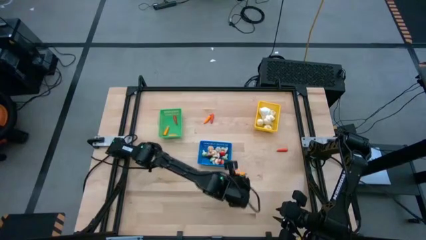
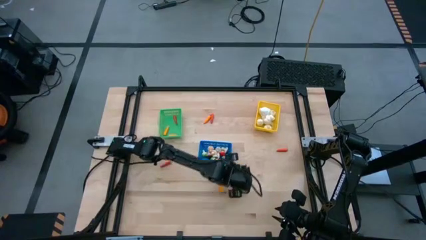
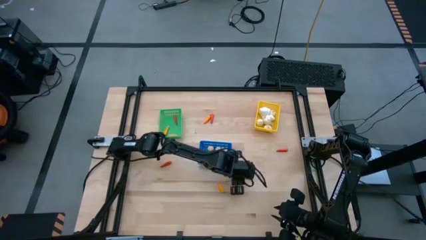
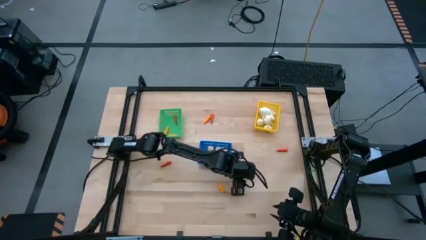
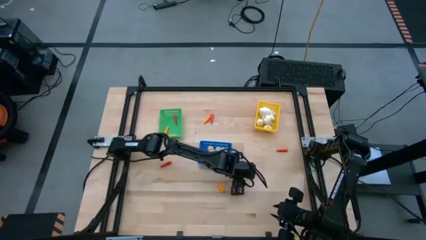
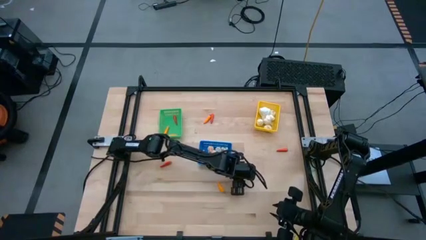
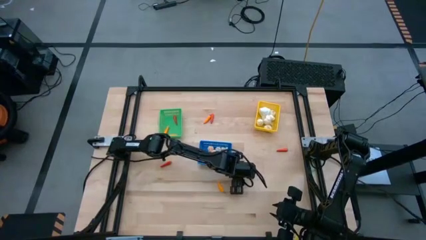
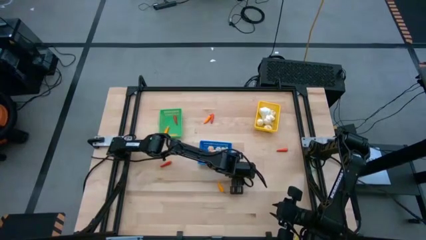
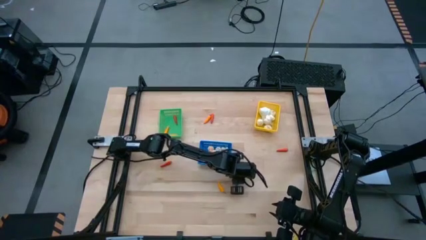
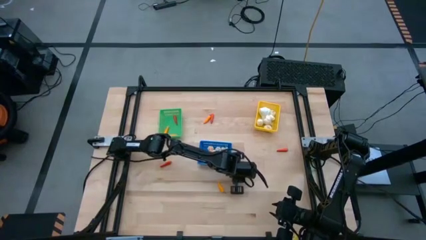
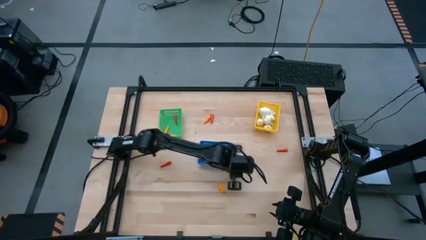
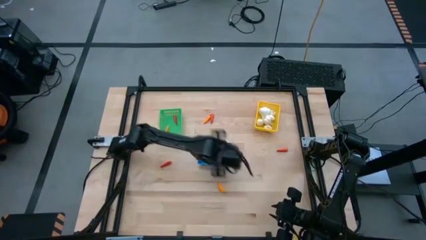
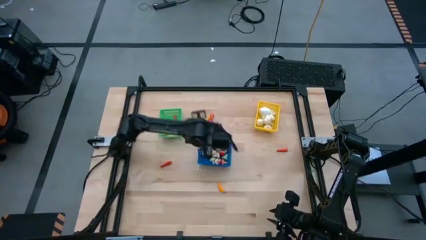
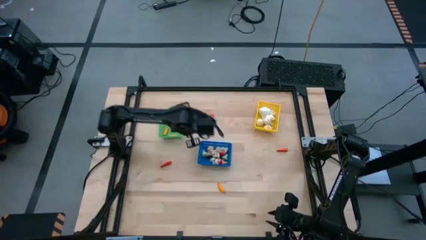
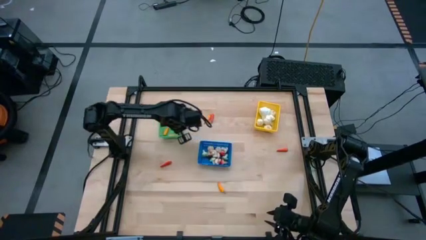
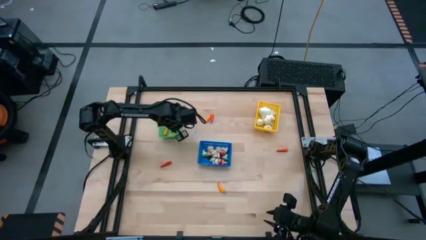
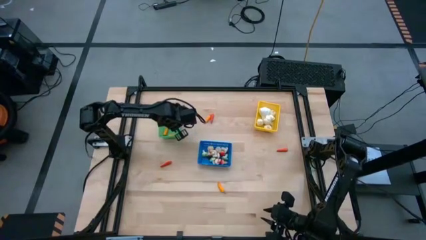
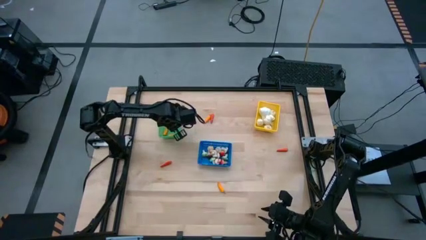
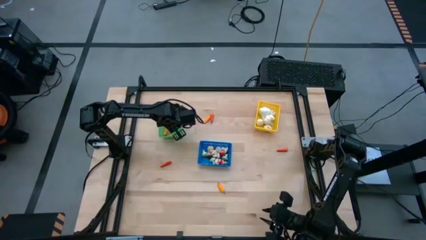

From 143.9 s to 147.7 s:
Task: Sort produce into baskets
Put the yellow chili pepper on the green bin

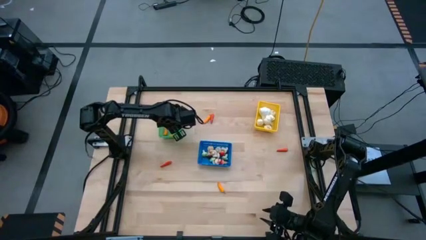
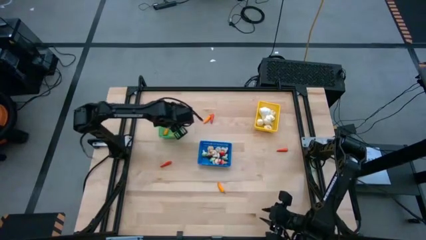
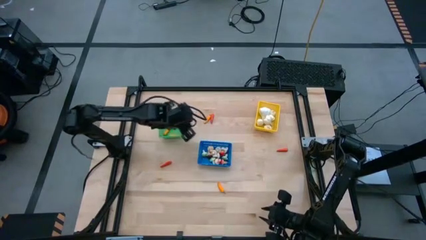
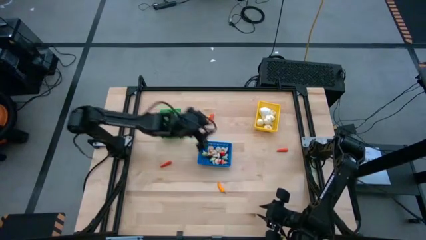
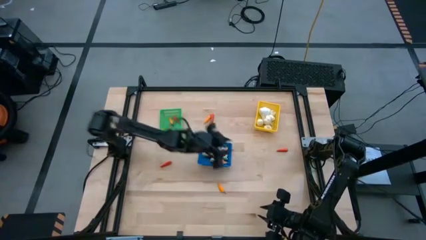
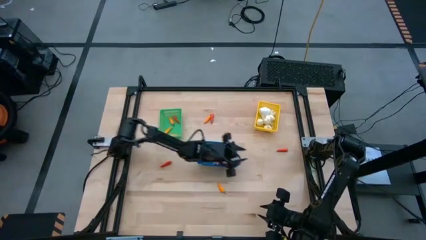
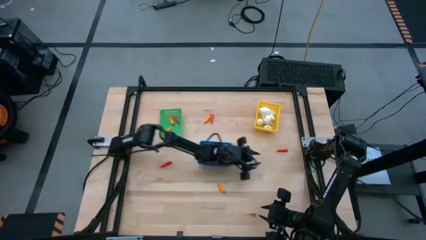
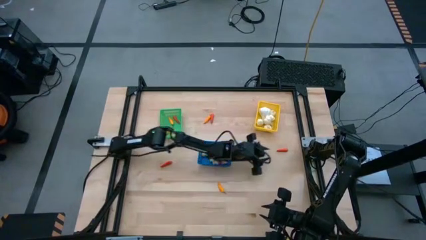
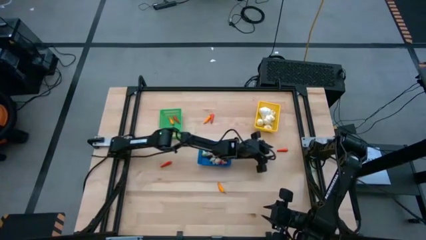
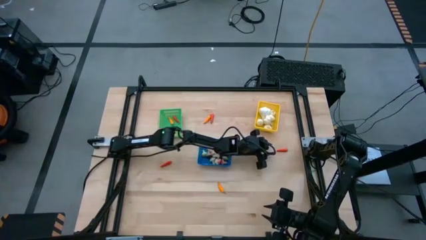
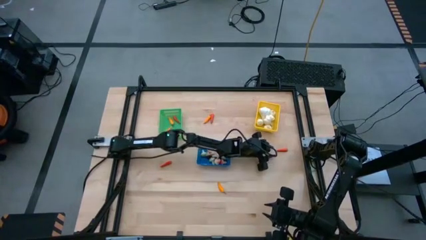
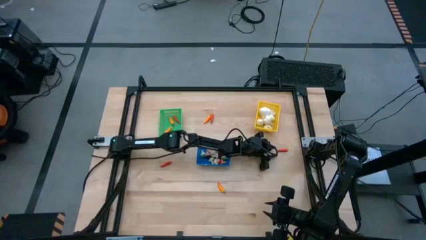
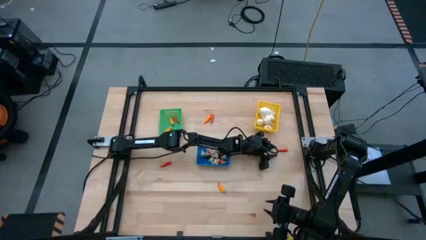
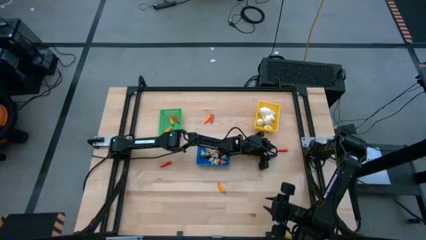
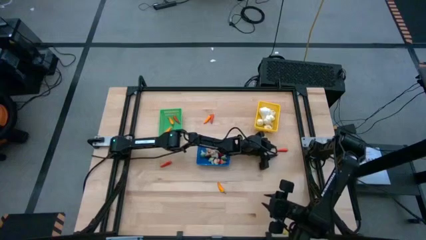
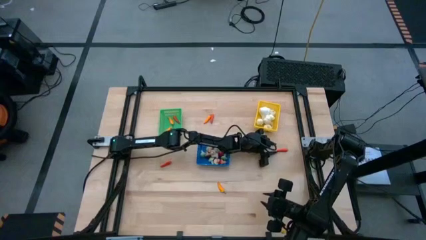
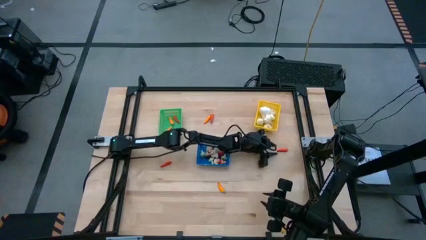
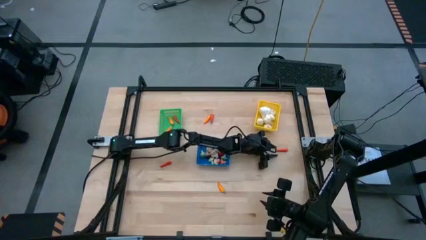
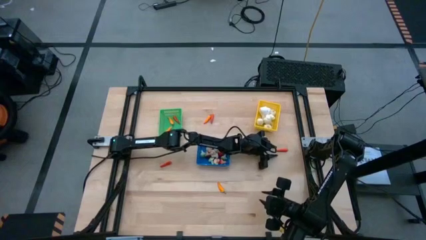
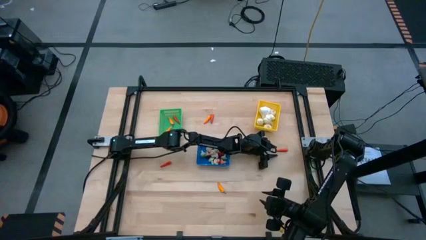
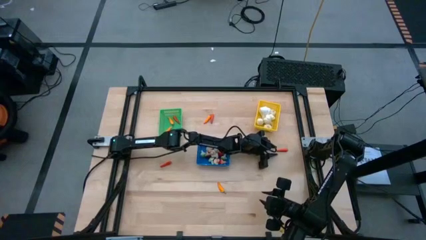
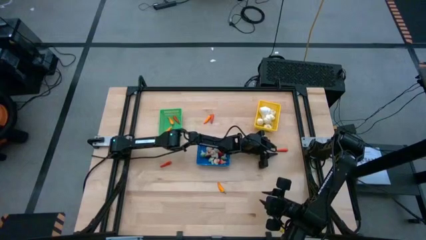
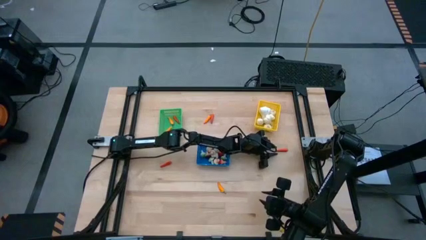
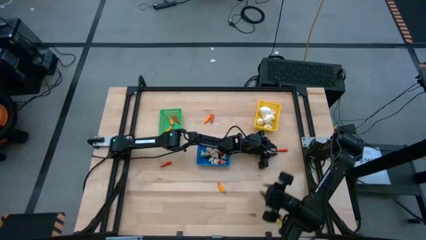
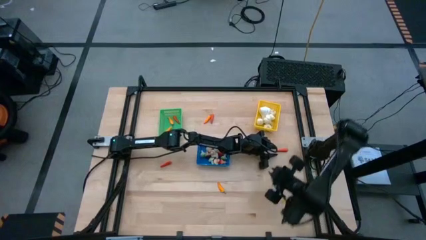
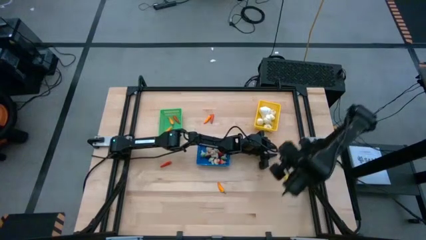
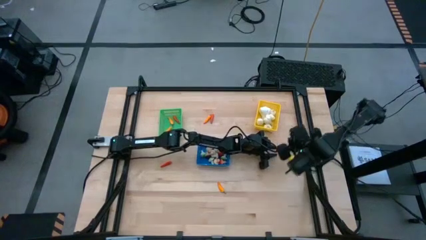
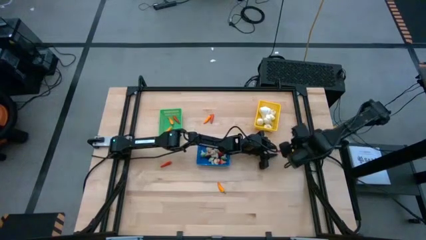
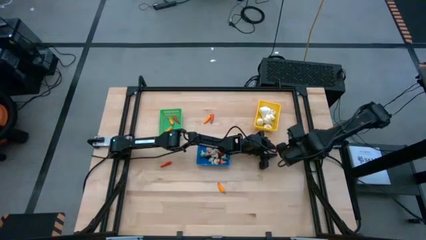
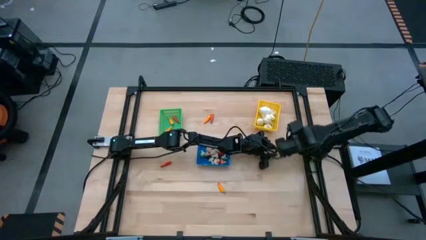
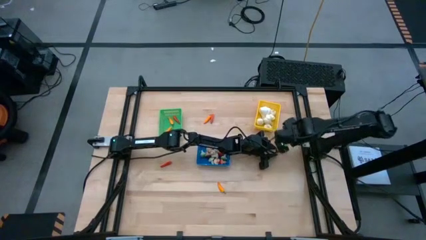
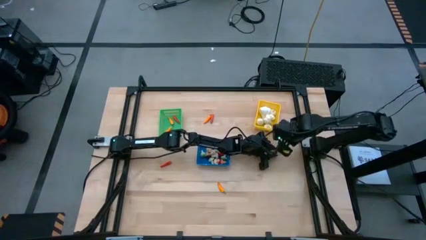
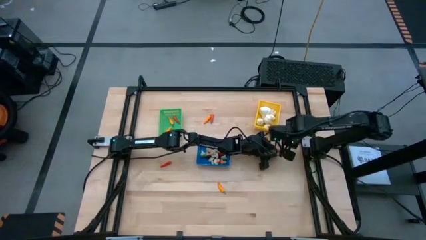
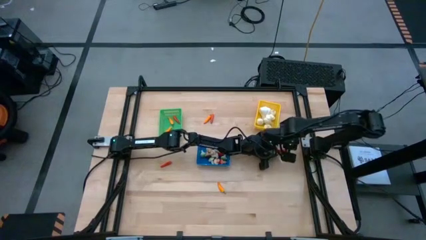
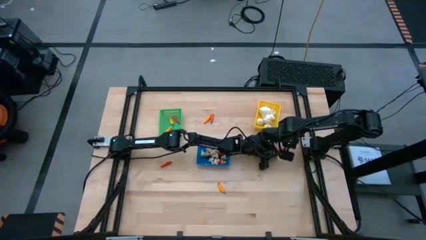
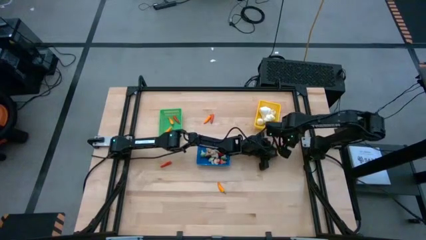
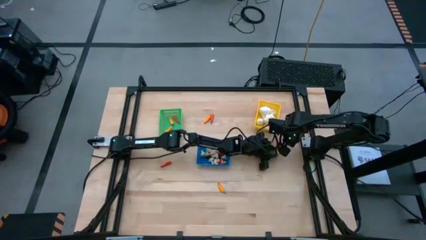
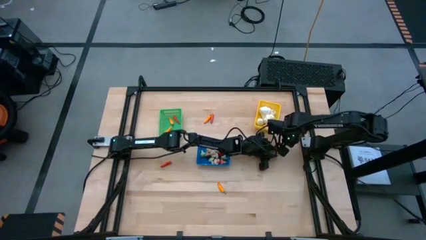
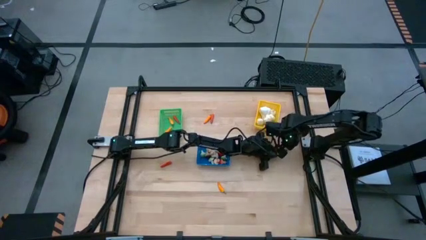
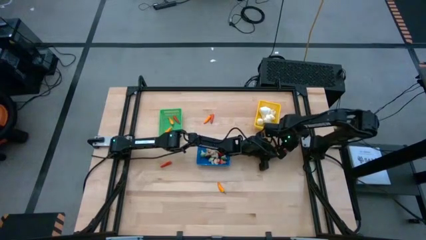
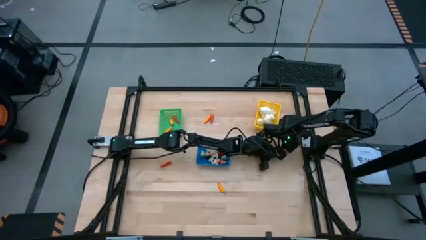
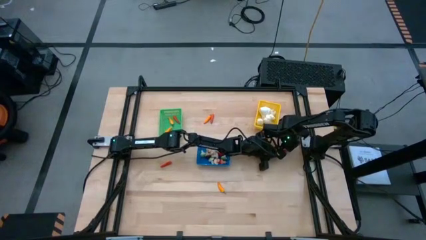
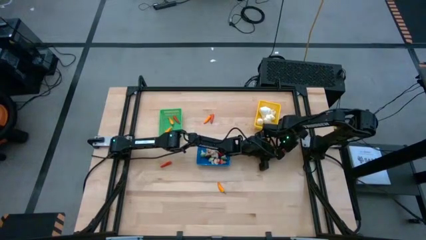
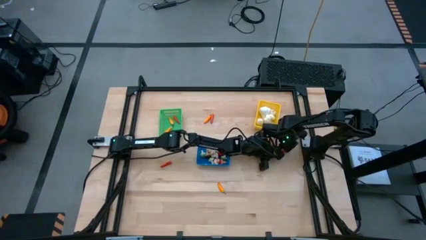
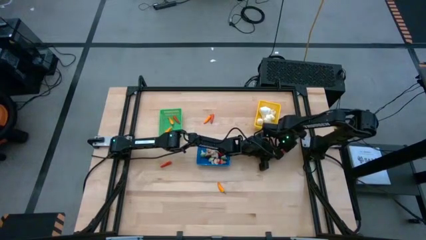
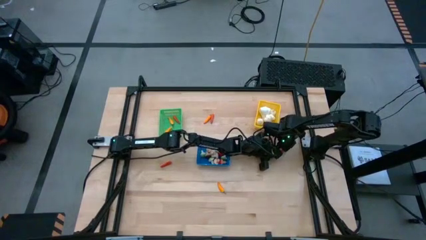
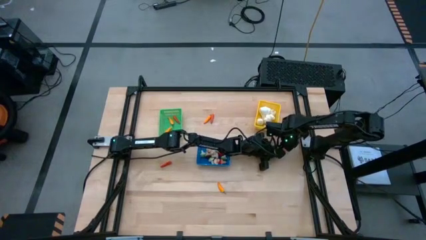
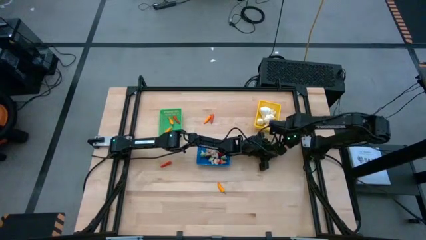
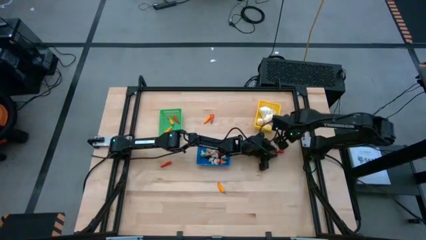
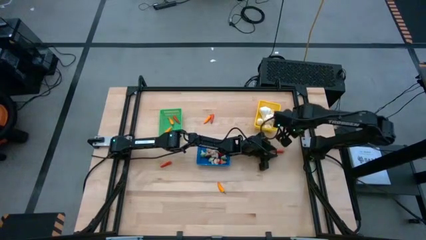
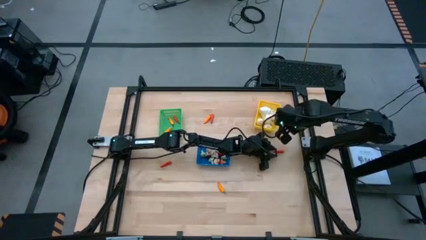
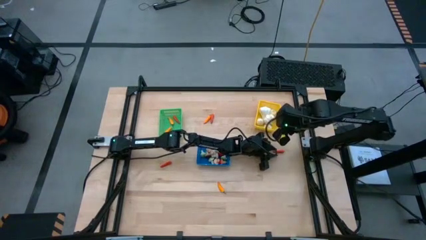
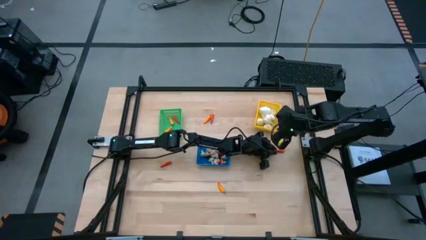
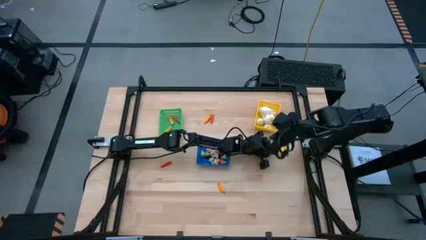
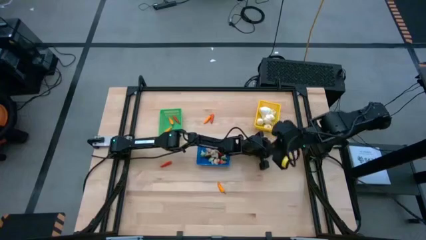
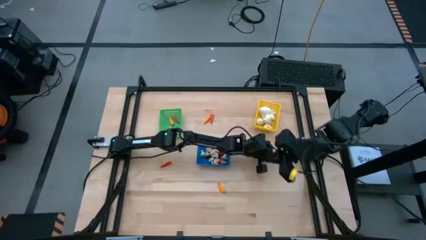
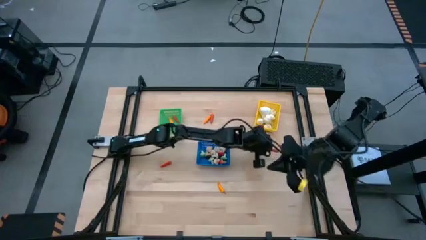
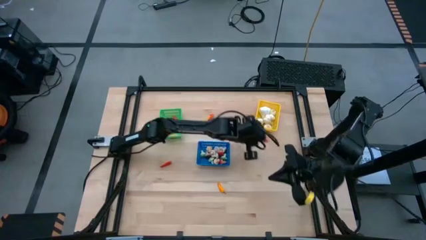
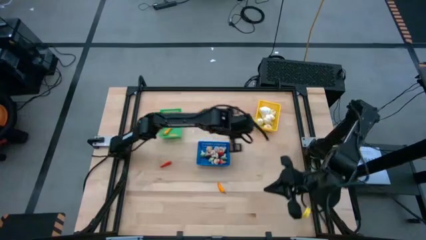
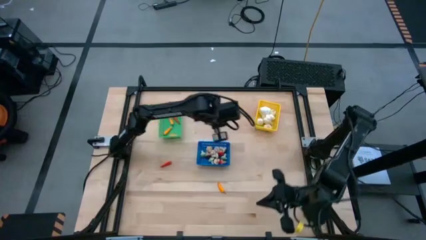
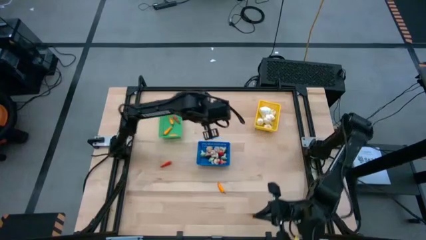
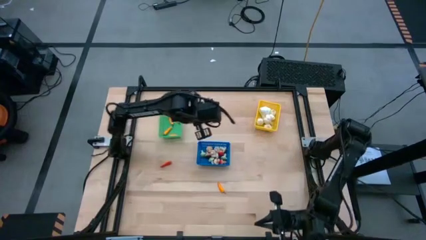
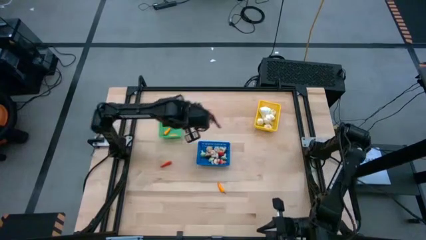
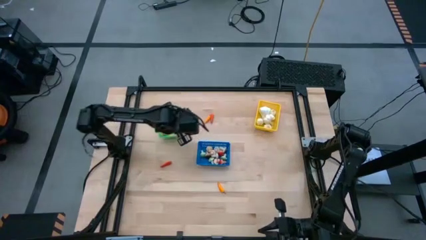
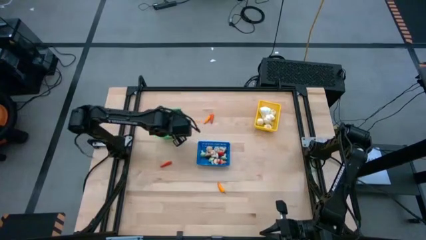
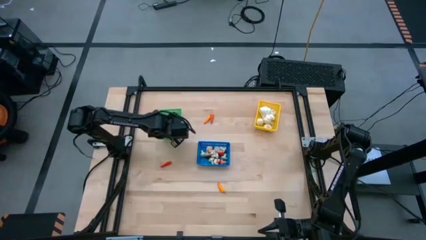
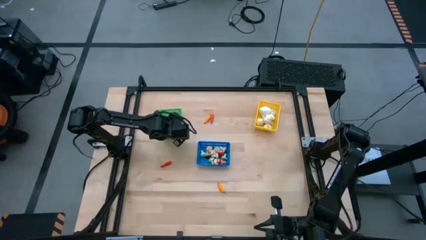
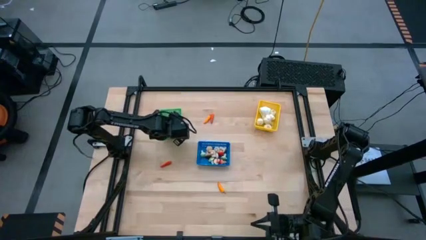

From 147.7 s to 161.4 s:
Put the carrot into the green bin
